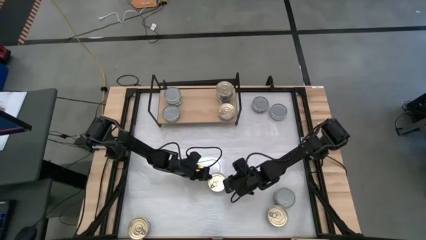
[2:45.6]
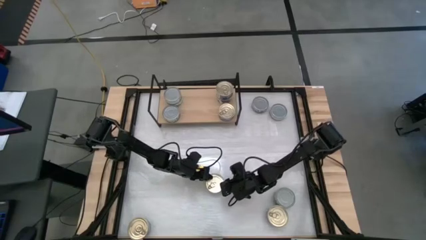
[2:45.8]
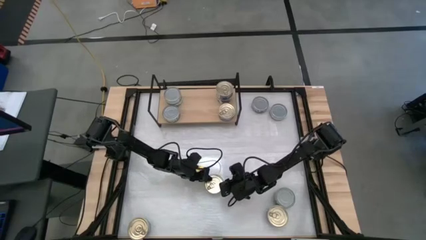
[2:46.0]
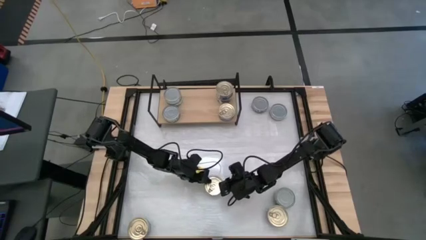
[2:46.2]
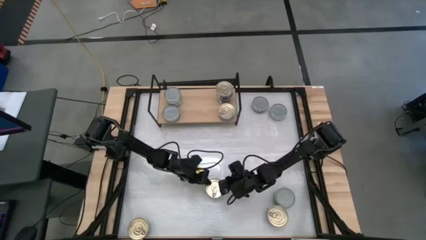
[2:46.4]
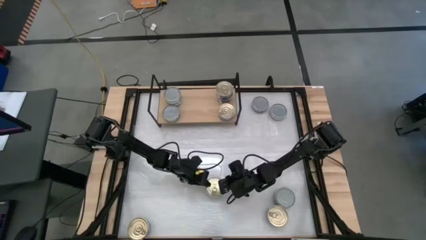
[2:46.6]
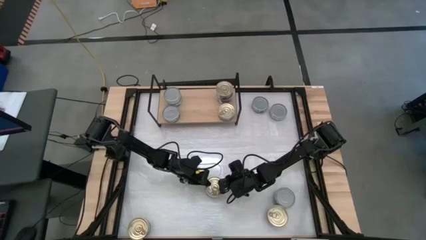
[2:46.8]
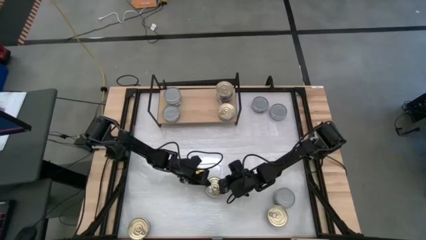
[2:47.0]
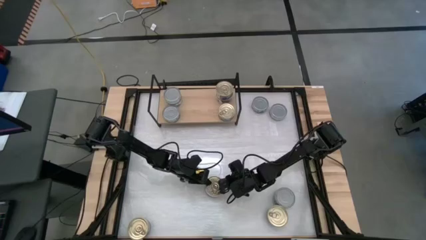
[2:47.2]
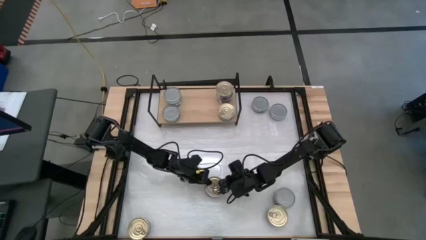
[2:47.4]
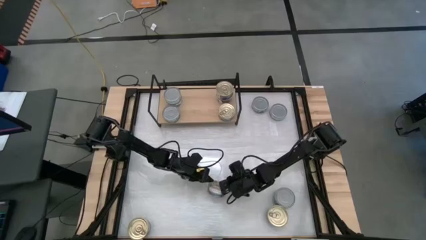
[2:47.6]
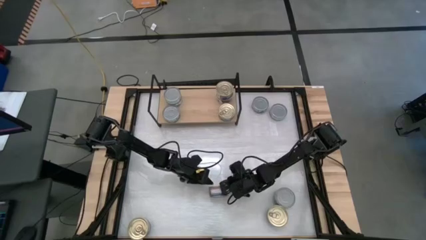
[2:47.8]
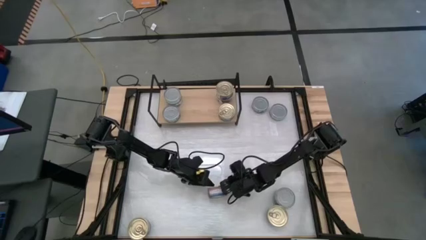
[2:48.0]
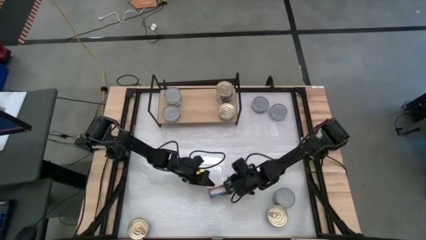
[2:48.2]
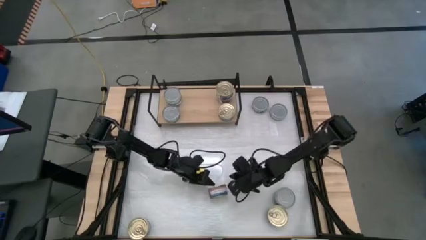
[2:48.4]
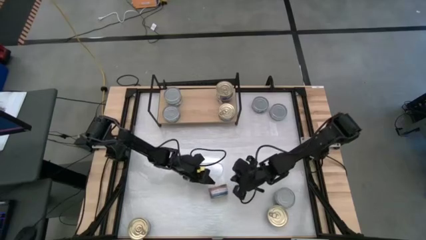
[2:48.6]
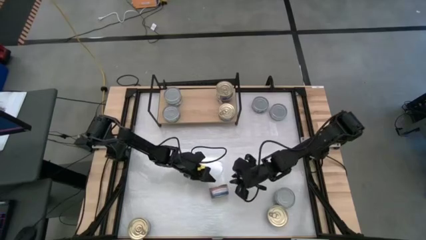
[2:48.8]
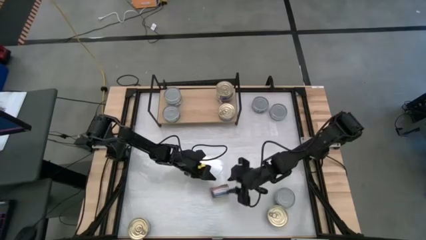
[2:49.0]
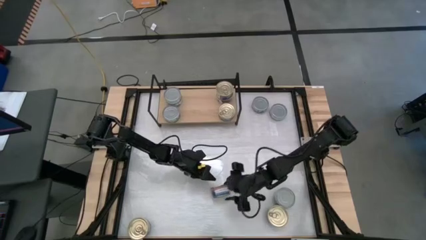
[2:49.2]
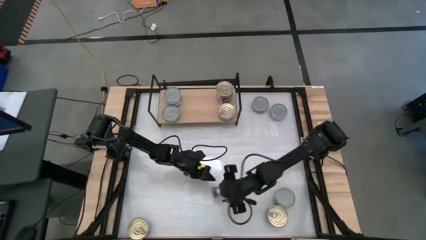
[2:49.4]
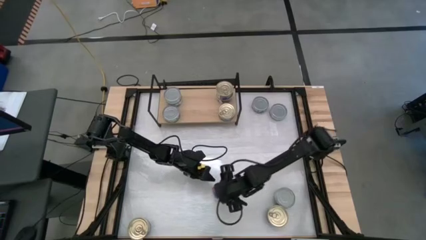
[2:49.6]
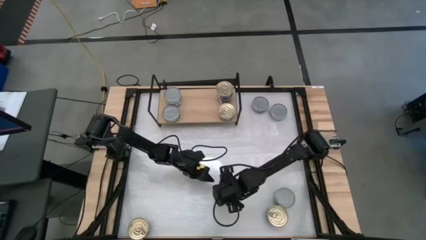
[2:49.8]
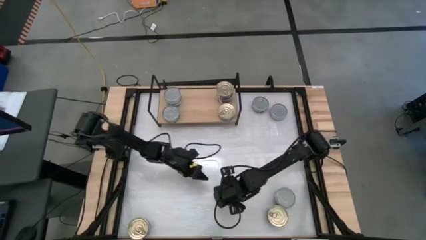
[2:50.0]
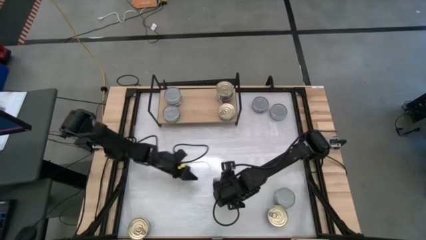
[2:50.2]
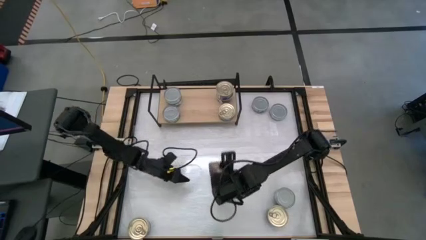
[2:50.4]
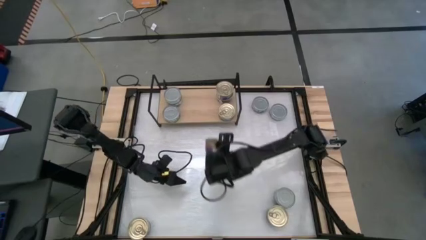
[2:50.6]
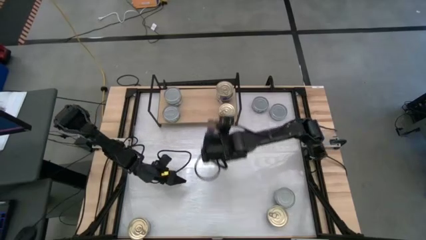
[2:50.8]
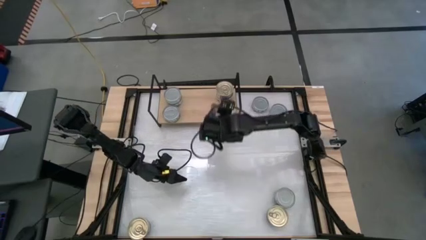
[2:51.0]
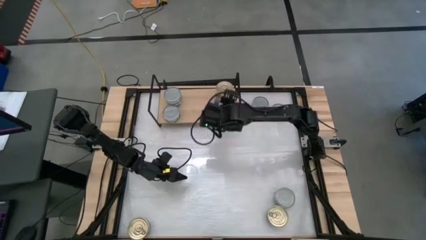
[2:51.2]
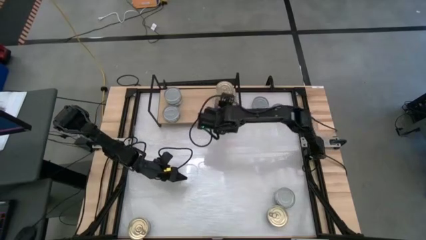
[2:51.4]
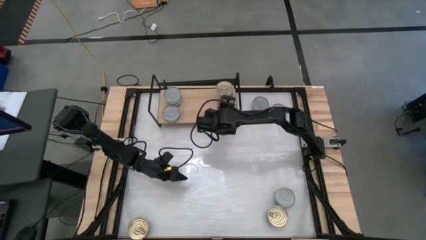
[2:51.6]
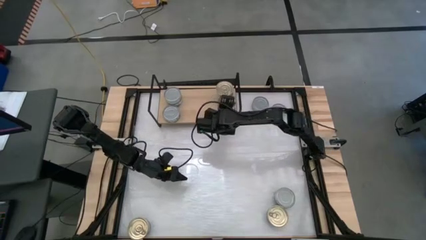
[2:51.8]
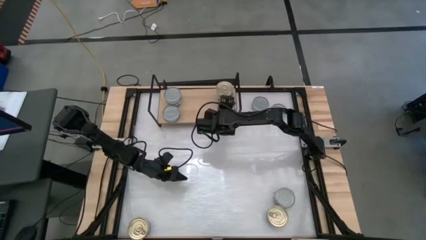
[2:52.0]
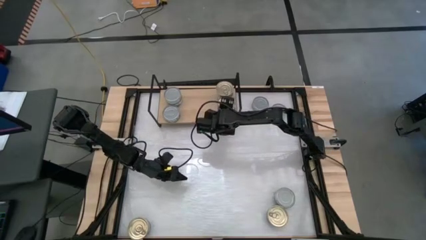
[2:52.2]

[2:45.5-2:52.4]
Task: Stack canned seafood by type on shelf
Stack the blue tuna can on top of the blue tuna can on the shelf

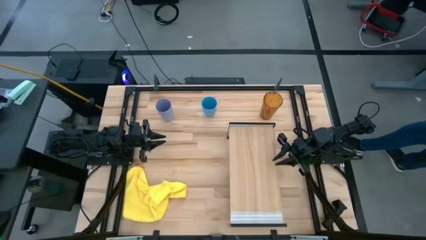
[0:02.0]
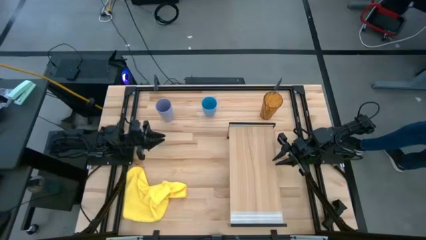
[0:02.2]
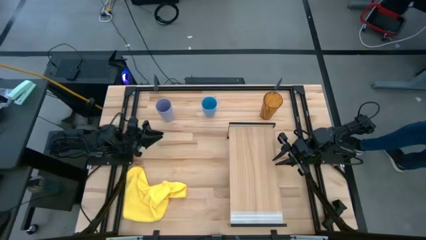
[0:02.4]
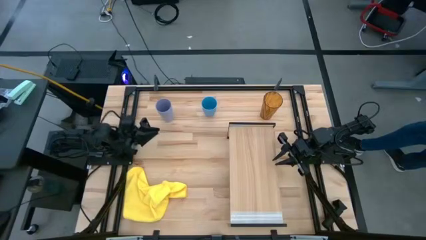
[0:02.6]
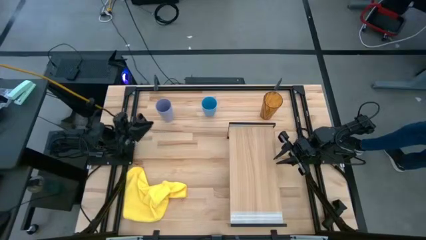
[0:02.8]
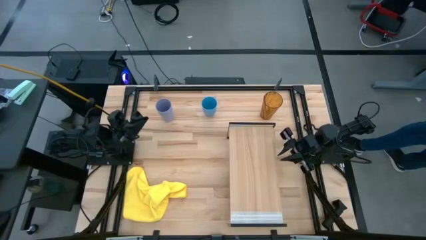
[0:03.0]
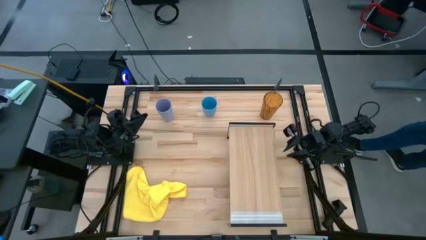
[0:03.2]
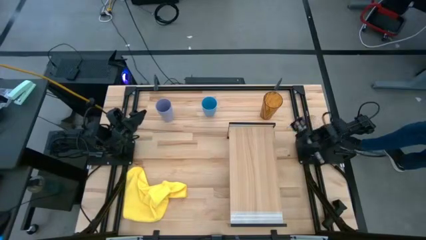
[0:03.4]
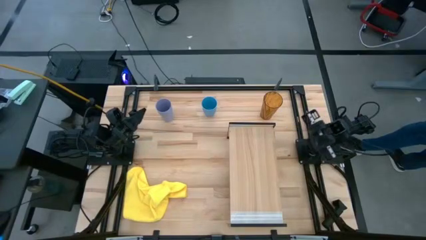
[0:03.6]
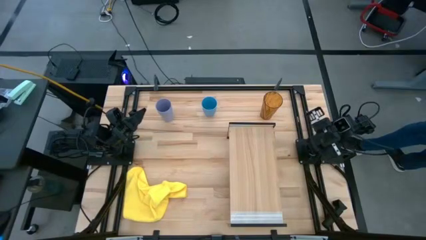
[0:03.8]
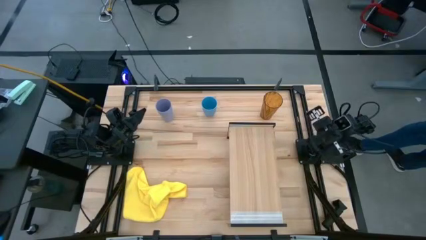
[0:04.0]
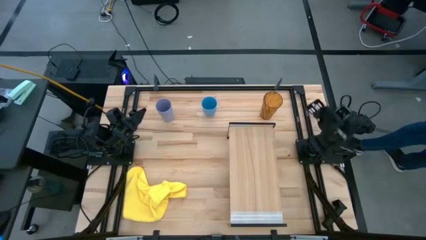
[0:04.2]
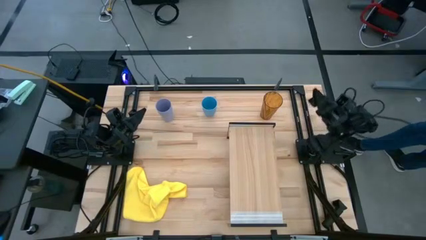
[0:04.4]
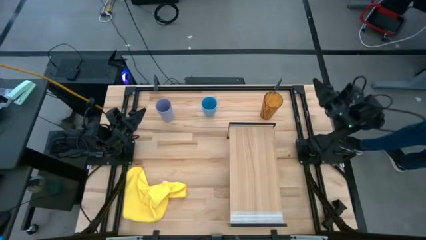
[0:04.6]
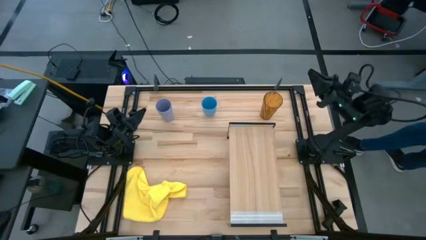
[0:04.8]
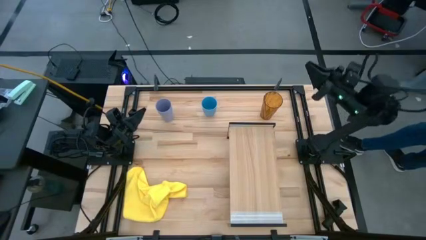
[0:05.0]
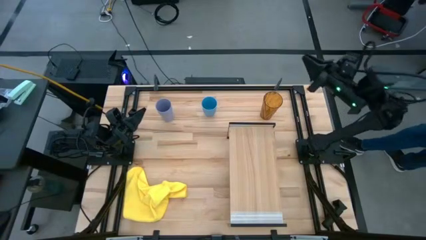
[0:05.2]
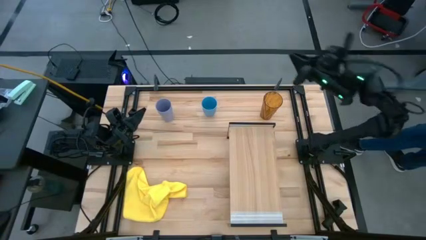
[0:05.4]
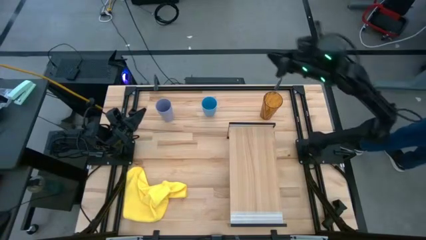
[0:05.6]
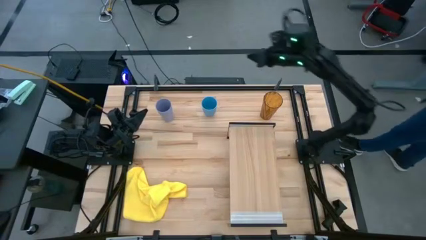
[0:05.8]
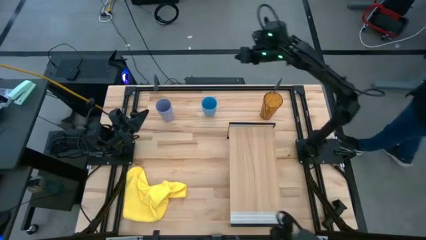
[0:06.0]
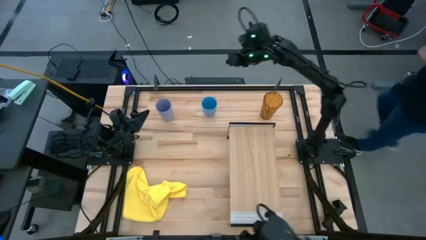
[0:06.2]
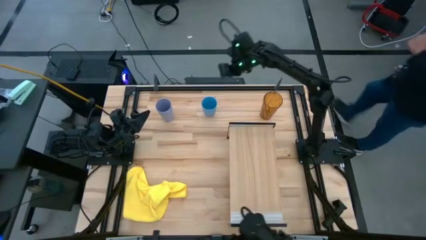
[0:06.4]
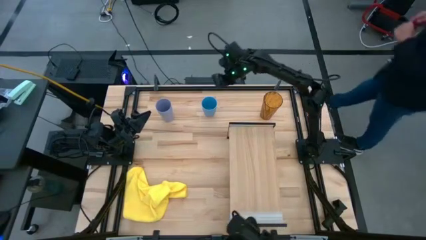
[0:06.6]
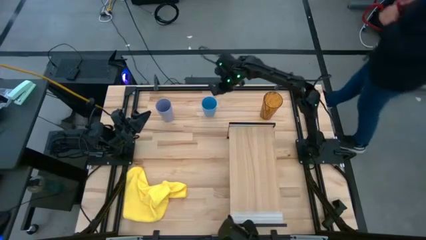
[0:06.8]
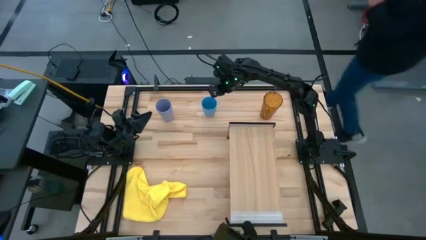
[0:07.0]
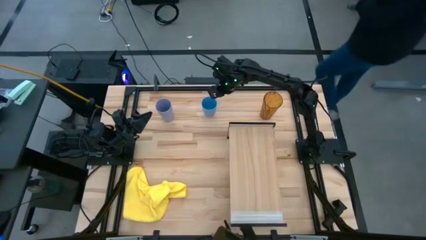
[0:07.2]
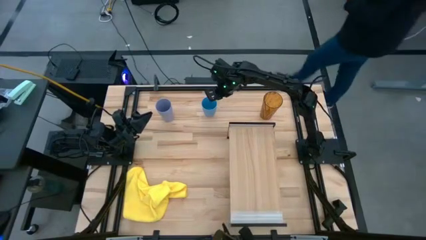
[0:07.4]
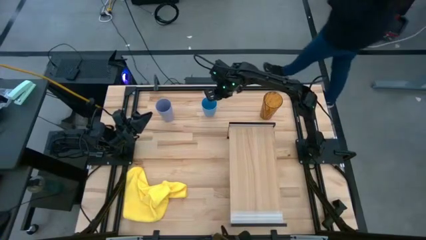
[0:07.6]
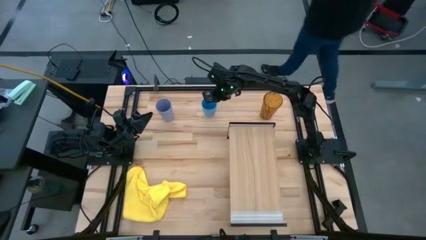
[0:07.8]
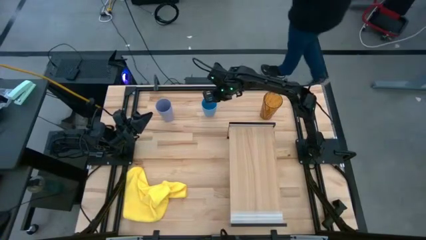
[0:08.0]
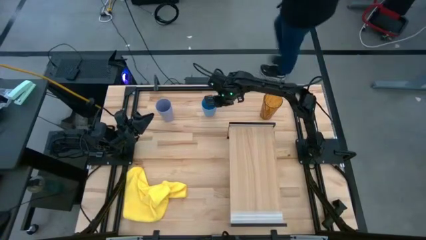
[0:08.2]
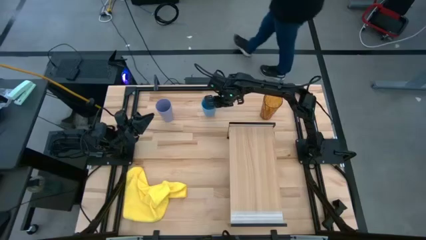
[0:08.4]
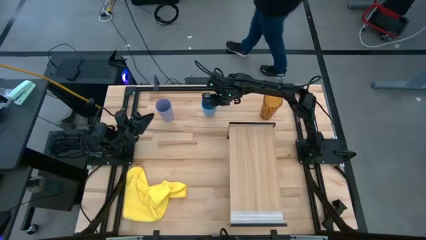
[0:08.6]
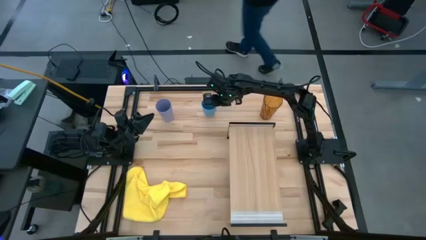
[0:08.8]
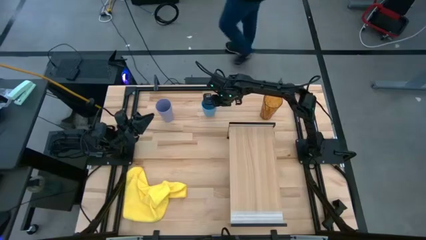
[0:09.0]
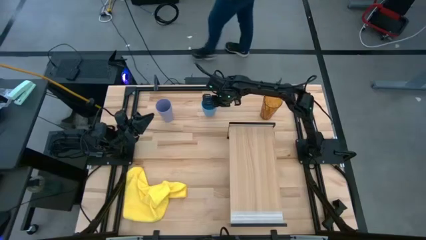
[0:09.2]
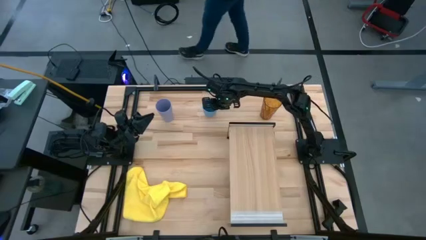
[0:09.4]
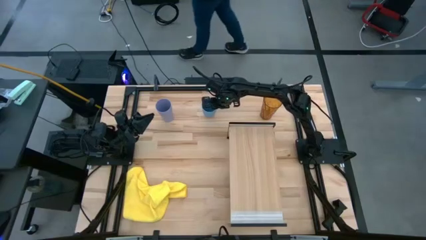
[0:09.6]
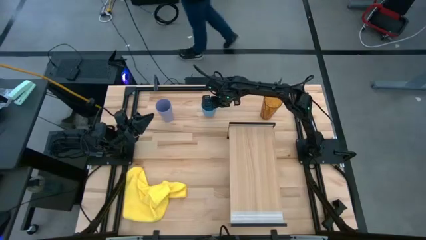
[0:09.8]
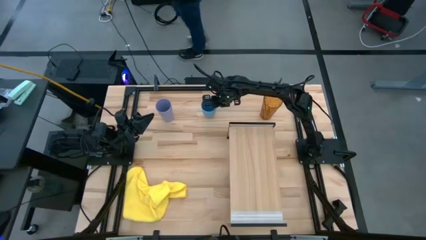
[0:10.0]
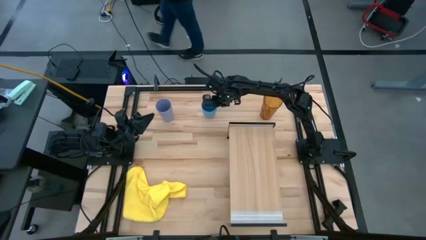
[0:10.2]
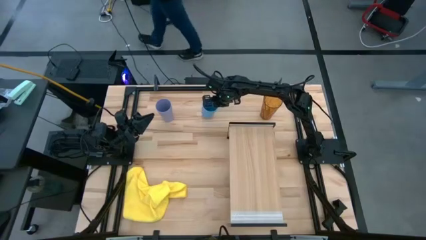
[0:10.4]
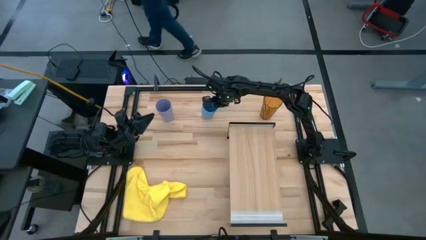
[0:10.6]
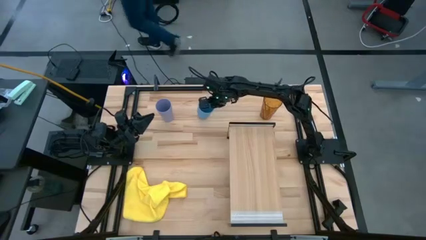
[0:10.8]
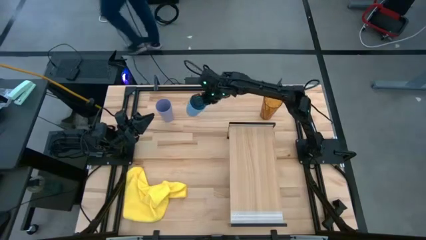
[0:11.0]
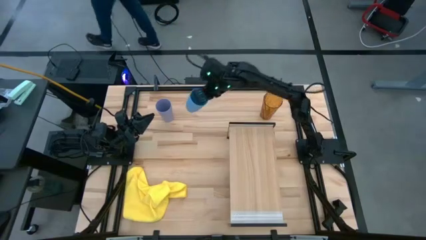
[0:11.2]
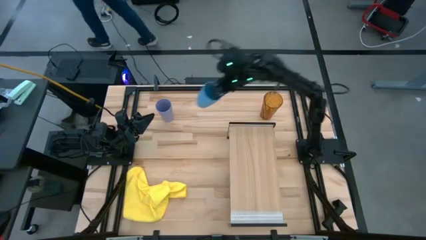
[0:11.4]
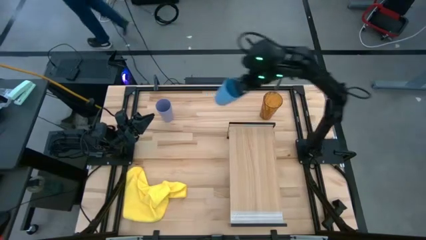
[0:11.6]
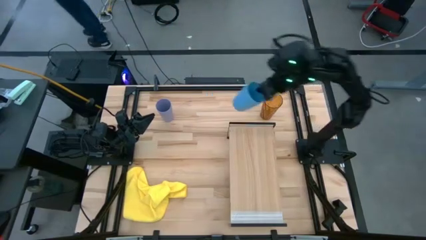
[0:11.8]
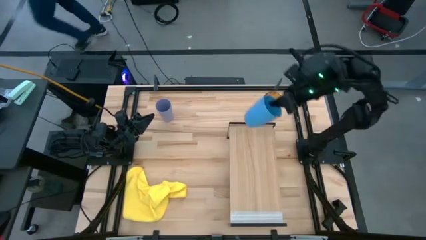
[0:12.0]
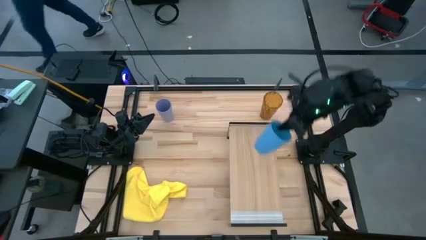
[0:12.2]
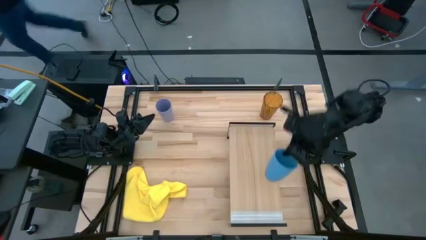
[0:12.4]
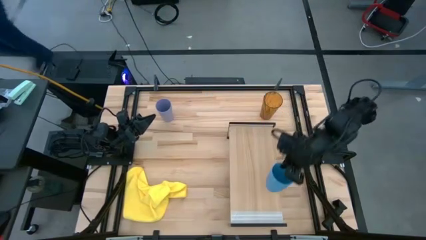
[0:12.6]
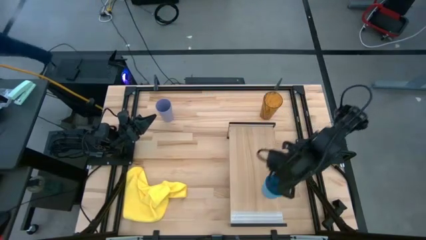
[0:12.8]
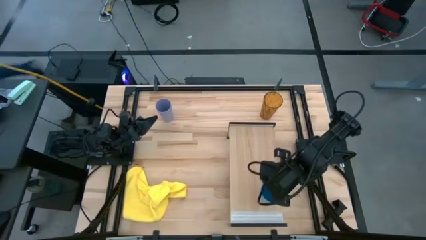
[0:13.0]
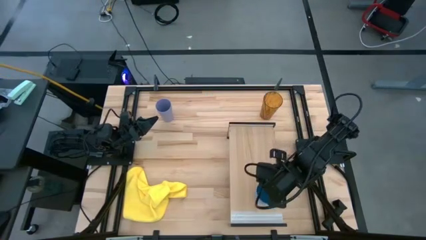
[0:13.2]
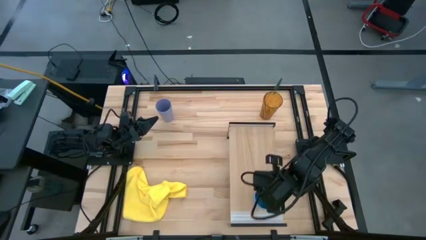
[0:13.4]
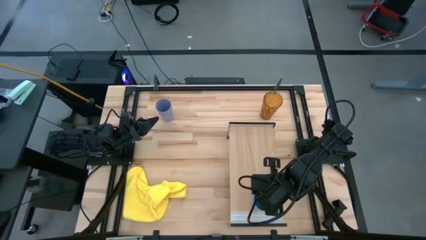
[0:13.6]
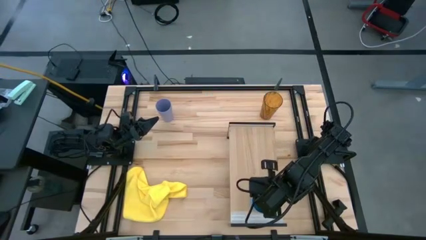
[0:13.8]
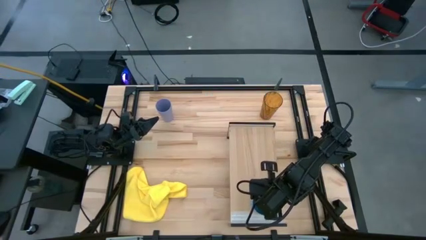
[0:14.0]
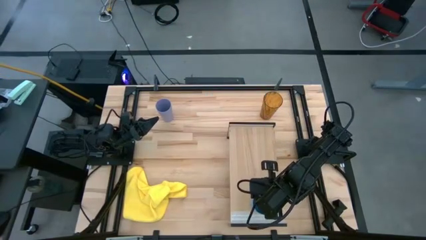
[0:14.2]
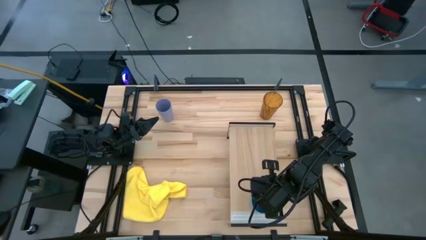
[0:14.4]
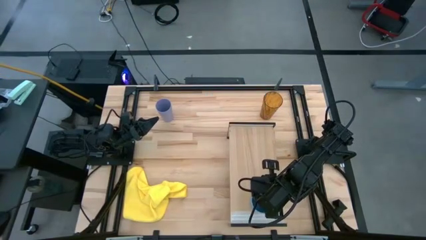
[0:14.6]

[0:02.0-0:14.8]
Task: Stack small to large cups/mugs on shelf
Put the blue cup onto the shelf
